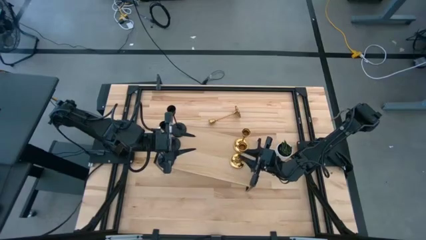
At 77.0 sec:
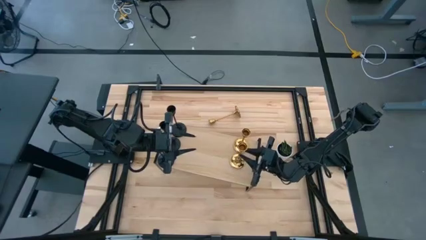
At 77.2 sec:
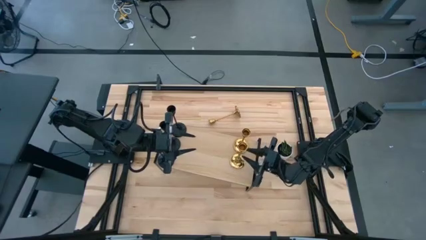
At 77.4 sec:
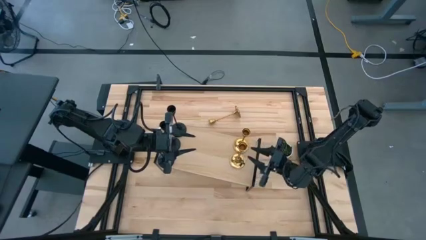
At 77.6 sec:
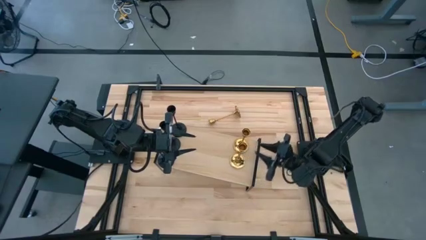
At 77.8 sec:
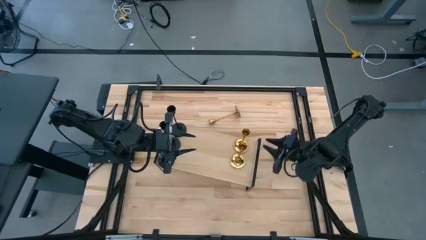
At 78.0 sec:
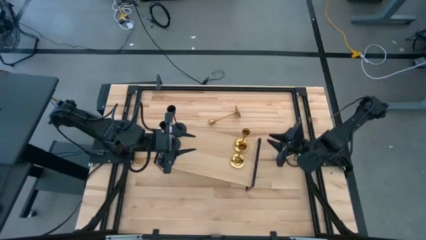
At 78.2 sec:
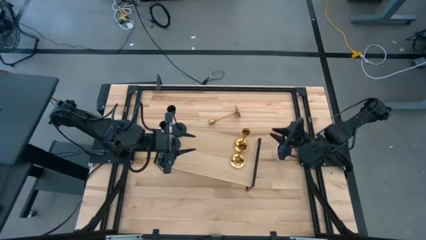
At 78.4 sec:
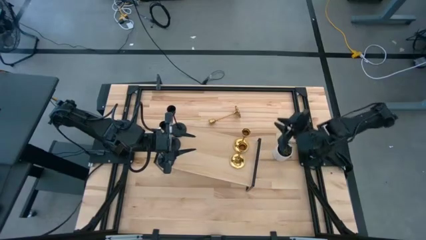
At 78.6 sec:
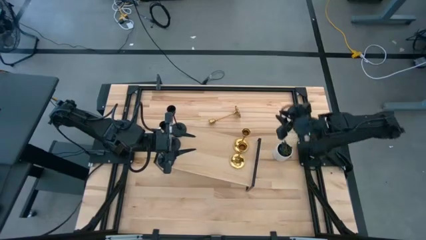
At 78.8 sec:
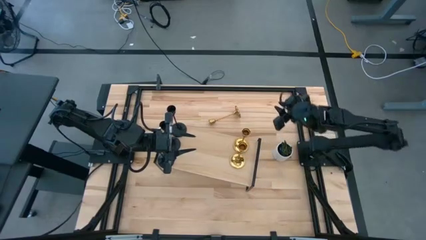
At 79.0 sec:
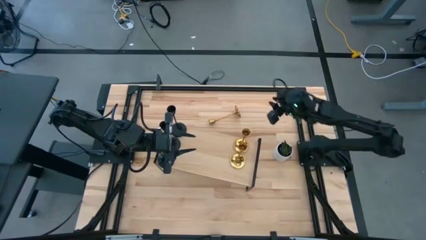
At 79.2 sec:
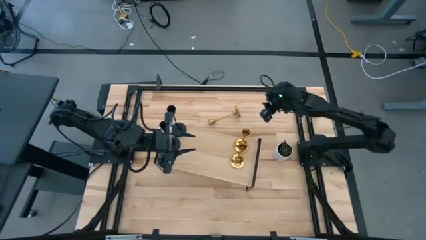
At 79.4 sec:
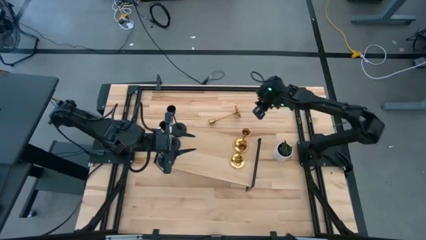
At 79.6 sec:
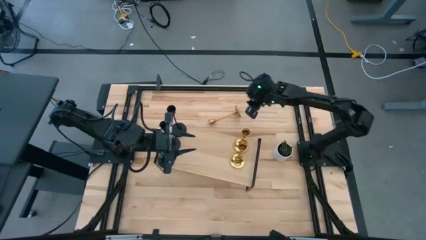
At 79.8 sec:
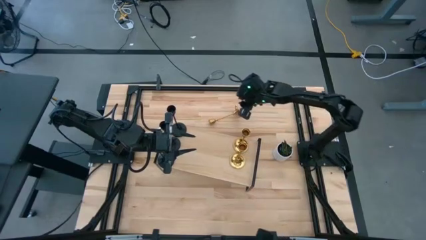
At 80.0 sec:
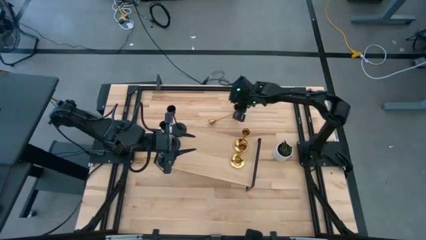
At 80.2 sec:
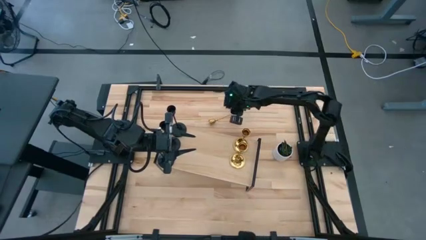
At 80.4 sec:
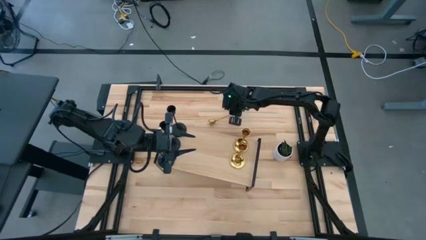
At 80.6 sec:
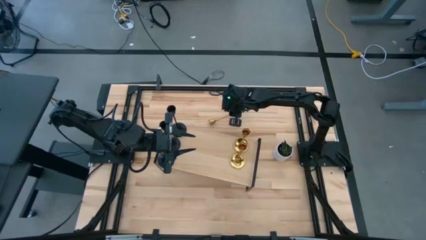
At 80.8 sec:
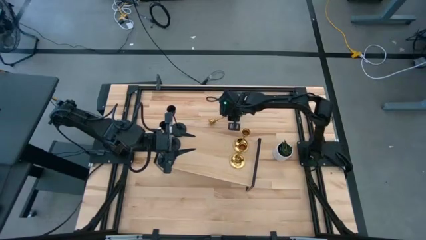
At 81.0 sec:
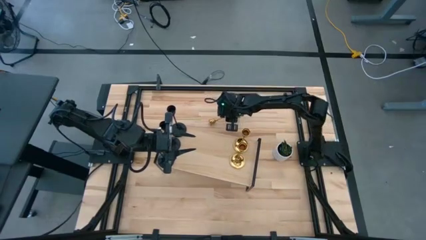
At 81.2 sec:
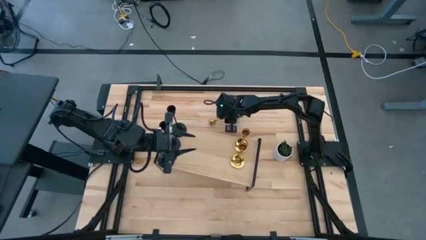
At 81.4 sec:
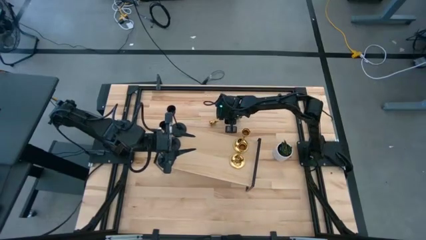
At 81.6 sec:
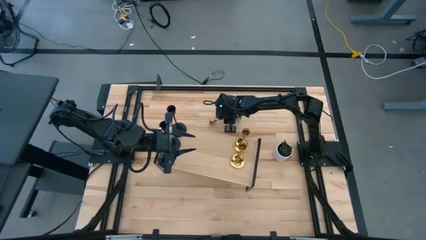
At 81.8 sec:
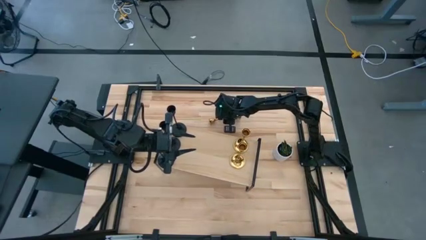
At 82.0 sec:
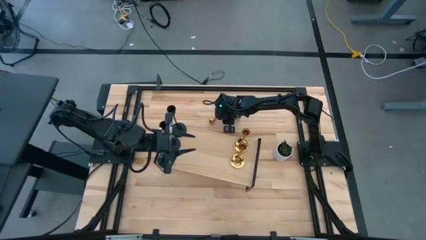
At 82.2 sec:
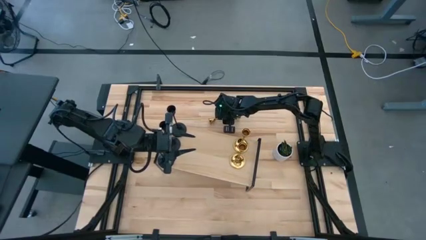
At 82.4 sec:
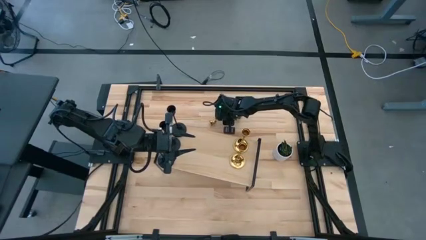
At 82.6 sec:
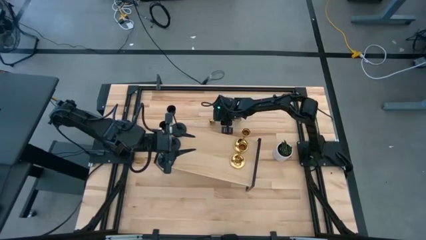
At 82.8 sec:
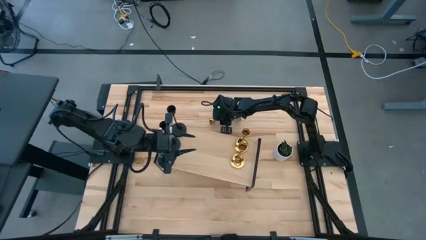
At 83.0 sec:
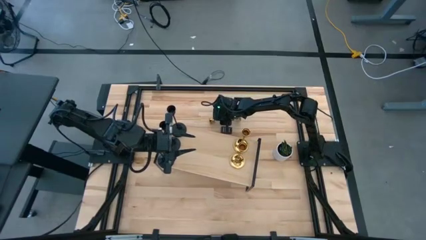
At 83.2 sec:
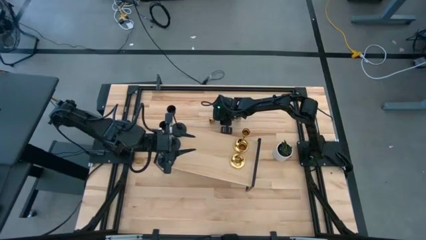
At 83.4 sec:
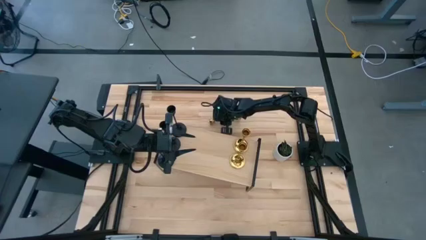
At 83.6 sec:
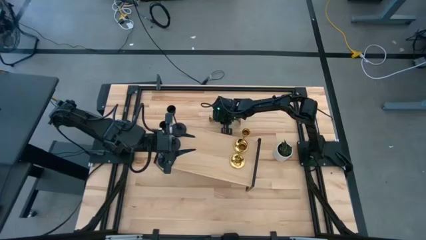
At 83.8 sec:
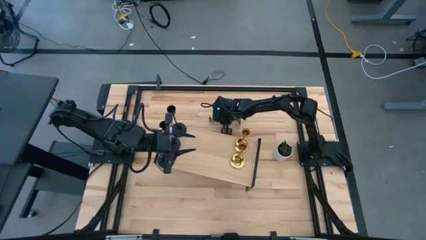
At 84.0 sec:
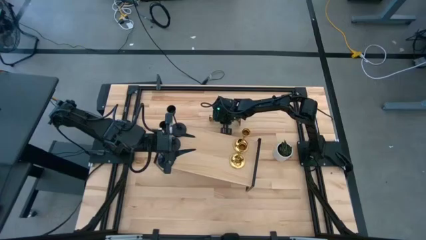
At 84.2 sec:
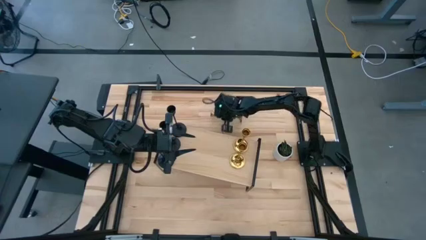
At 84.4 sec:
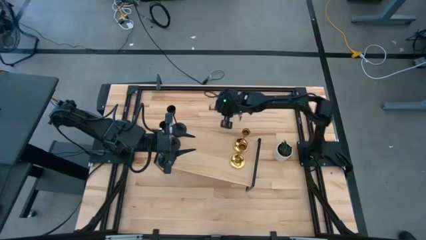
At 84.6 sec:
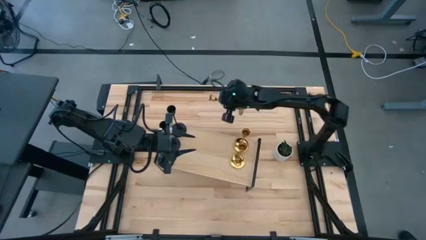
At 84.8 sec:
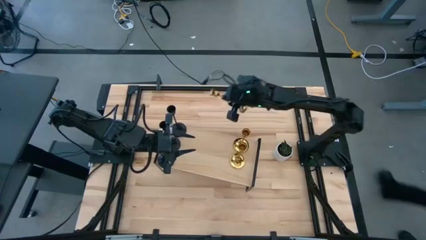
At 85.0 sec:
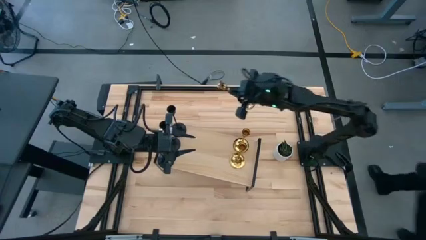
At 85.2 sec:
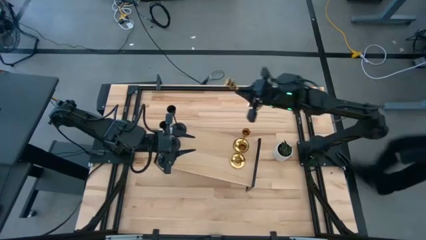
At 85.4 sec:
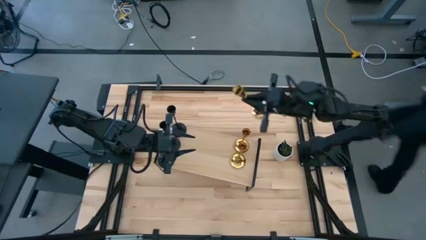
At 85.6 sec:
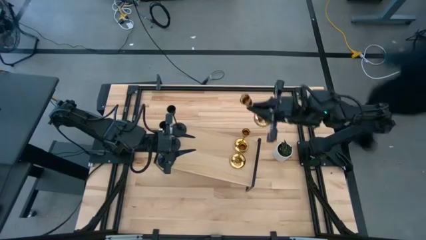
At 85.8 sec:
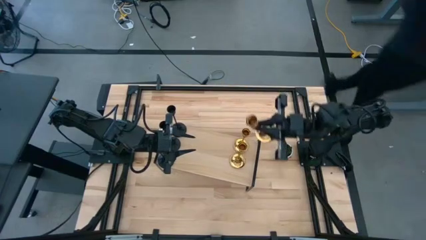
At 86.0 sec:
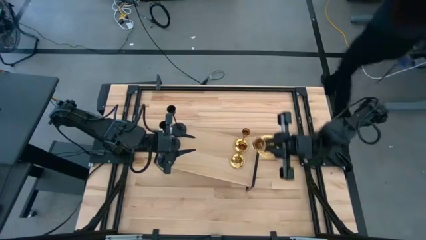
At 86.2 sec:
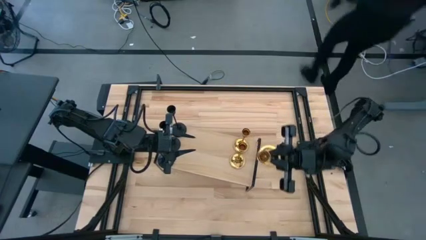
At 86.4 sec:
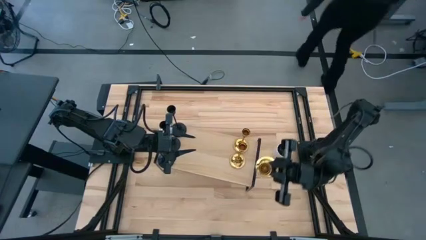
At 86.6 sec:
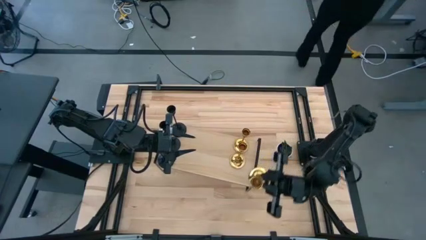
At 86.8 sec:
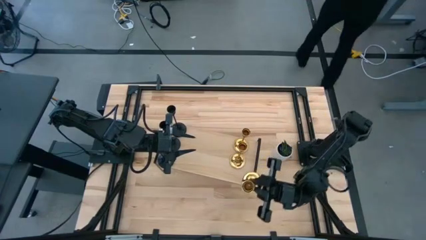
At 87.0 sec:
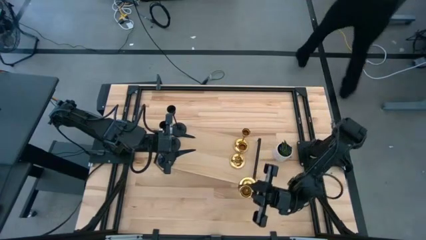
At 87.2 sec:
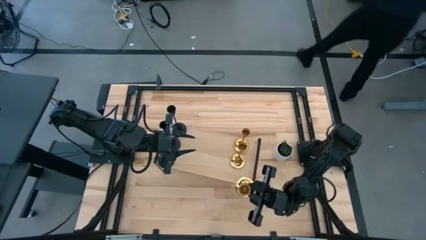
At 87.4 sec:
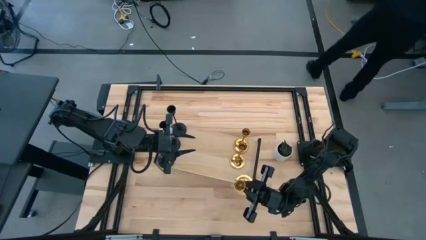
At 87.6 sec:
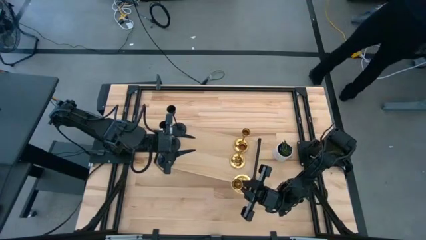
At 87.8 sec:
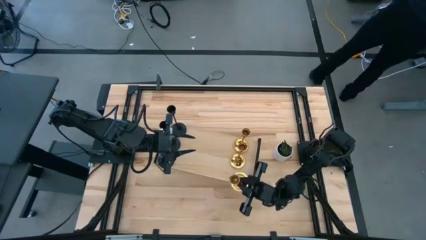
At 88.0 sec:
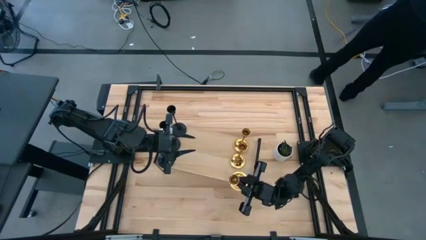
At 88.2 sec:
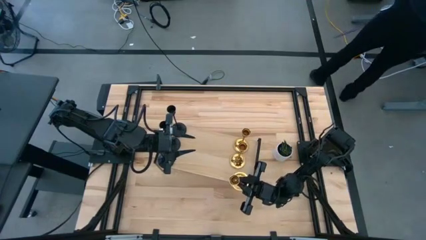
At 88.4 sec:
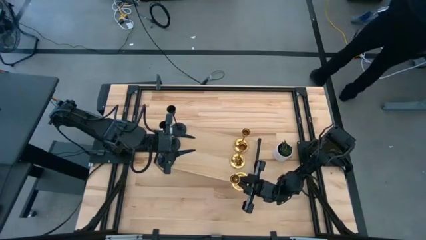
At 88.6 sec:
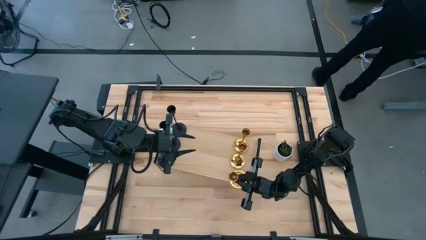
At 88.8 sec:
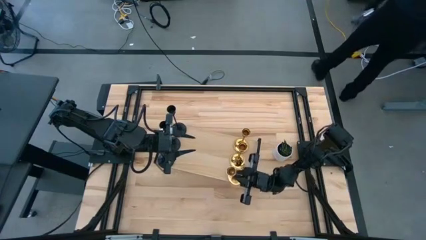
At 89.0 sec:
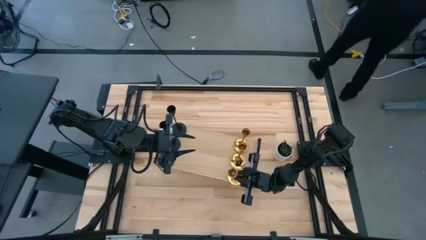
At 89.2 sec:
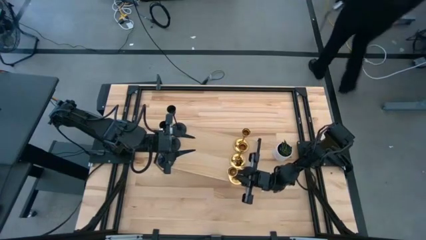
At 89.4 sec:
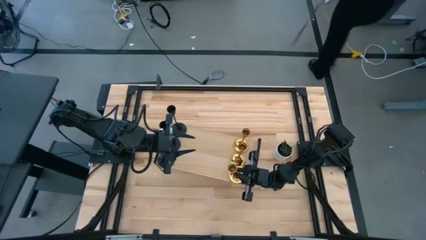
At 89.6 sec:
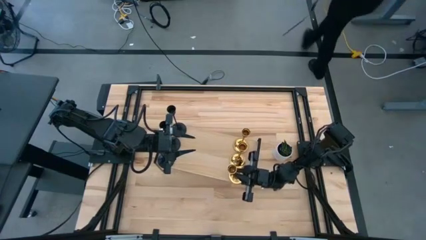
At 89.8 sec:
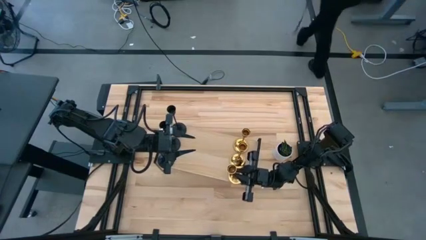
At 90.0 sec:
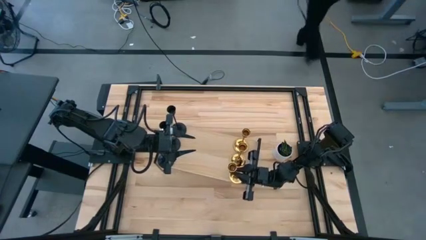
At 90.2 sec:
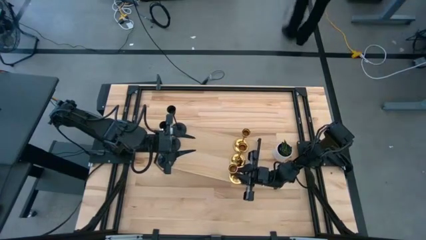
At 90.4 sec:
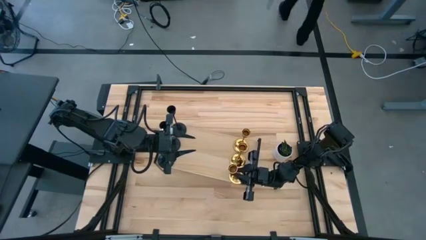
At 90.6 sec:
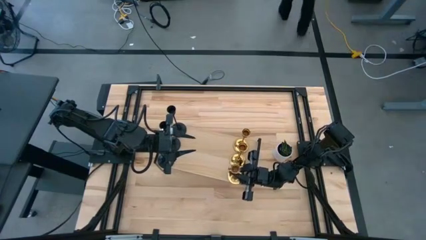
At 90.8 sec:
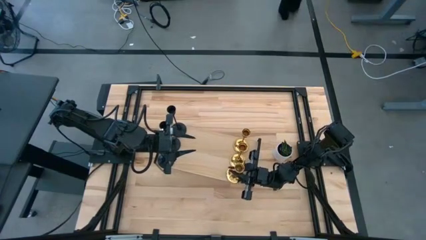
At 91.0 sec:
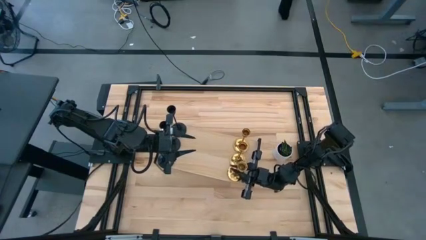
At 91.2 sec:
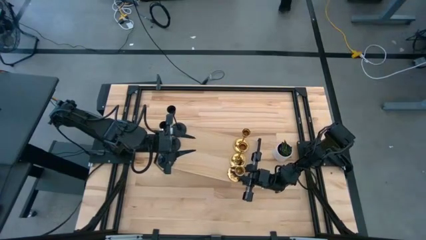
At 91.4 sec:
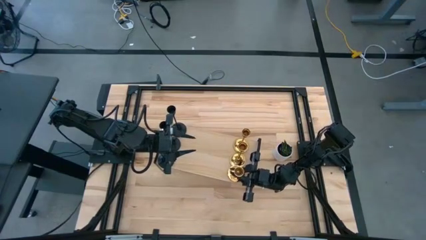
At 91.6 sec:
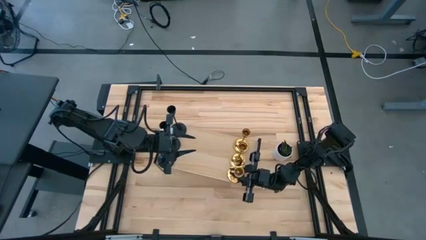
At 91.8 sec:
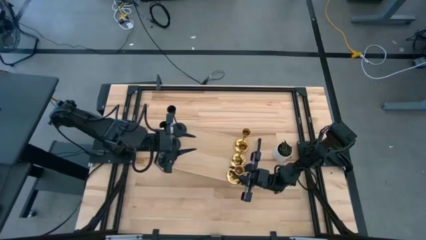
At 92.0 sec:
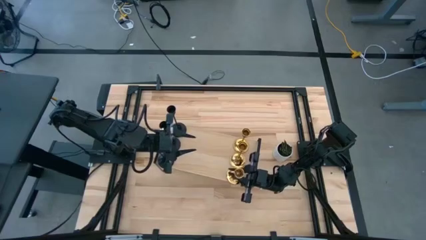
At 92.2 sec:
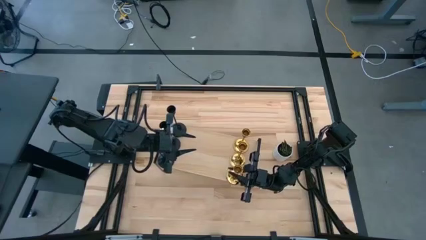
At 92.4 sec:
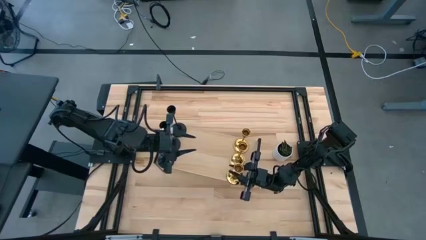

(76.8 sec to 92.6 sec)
Task: Pick & Place candle stick holders
Put the gold candle holder on the shelf aligned with the other gold candle holder
